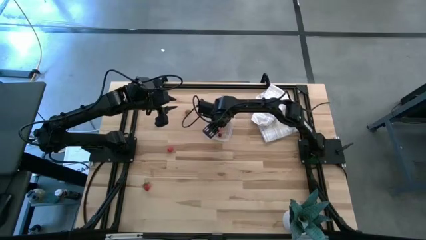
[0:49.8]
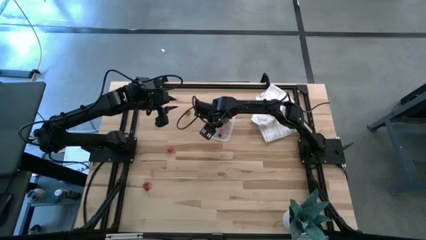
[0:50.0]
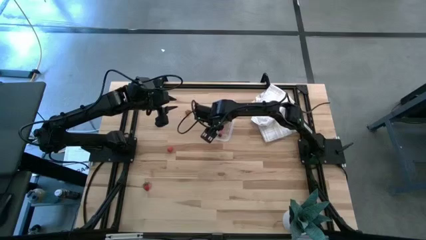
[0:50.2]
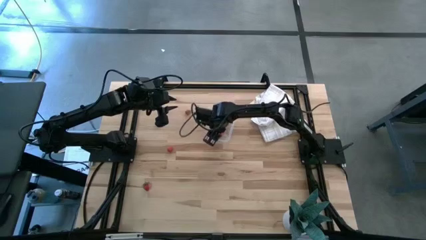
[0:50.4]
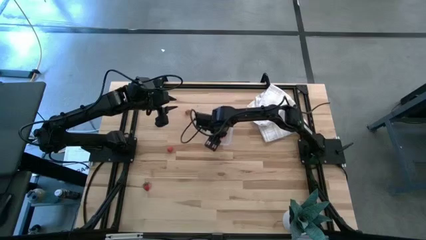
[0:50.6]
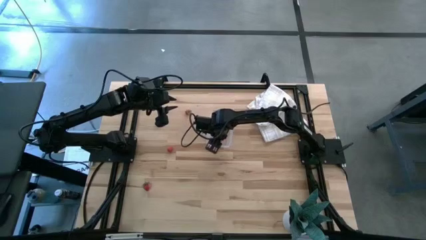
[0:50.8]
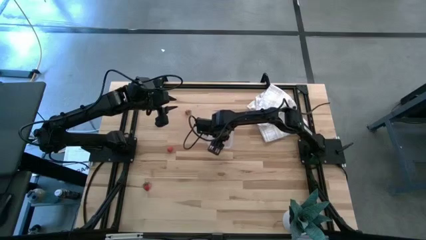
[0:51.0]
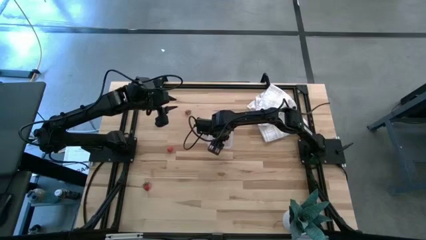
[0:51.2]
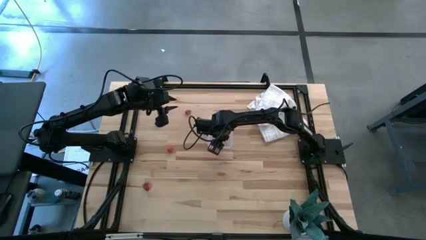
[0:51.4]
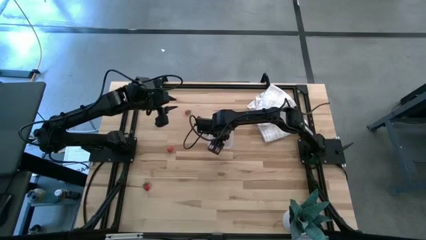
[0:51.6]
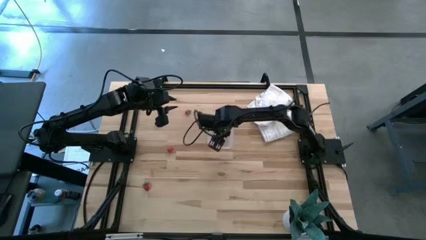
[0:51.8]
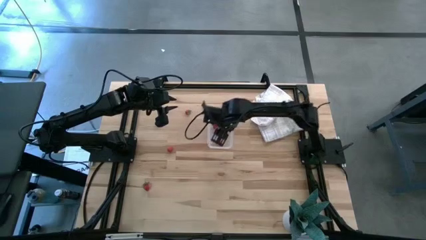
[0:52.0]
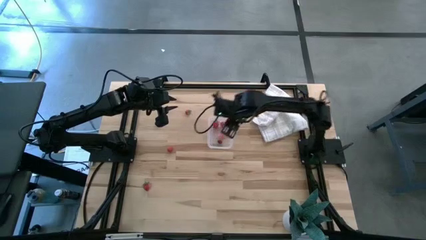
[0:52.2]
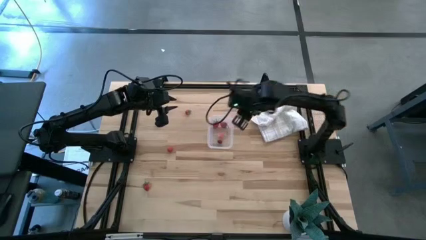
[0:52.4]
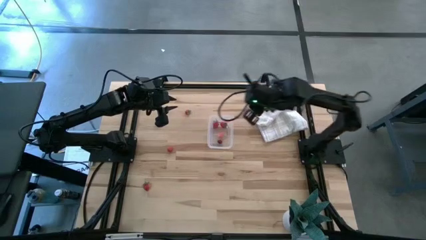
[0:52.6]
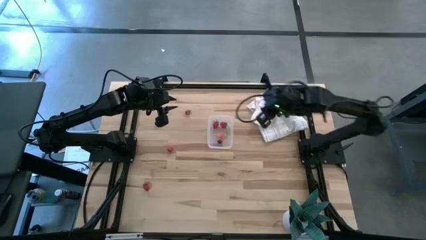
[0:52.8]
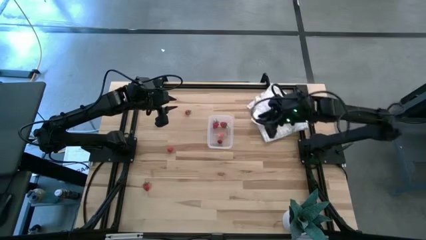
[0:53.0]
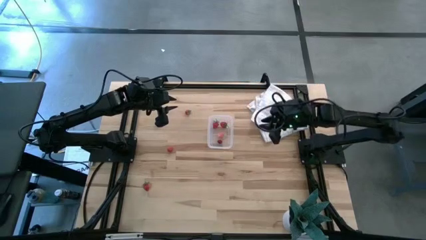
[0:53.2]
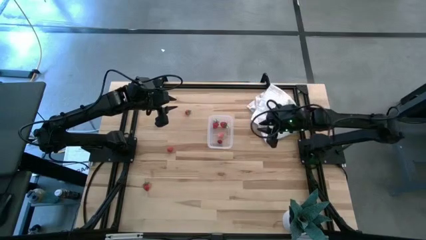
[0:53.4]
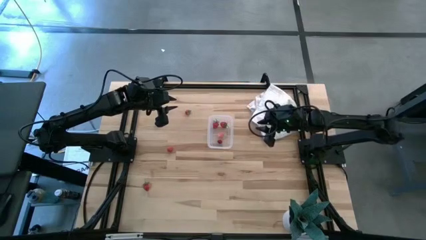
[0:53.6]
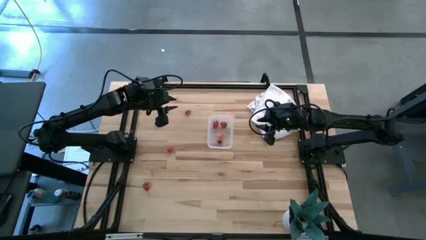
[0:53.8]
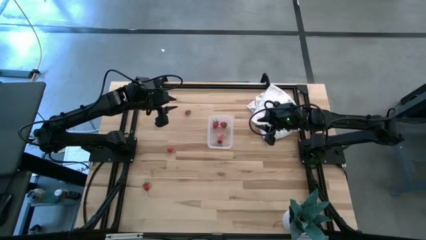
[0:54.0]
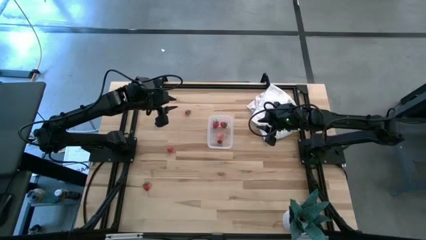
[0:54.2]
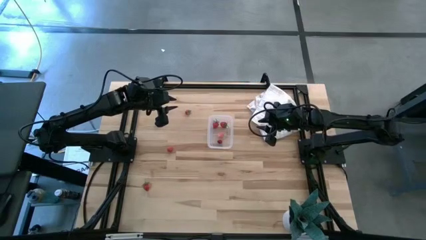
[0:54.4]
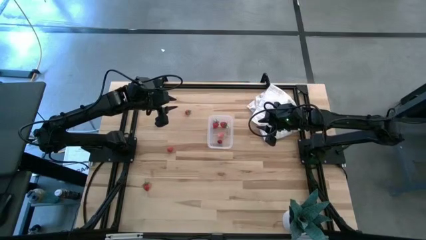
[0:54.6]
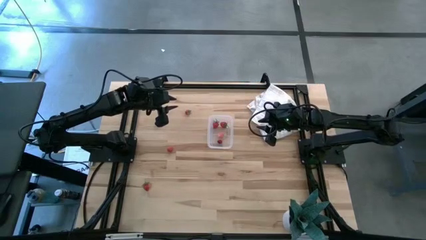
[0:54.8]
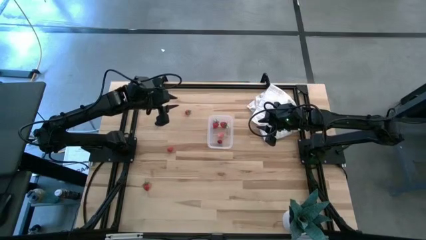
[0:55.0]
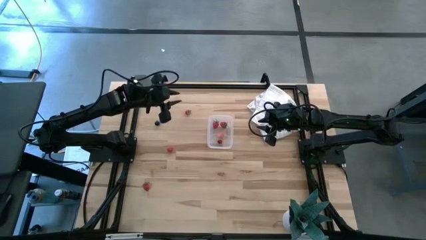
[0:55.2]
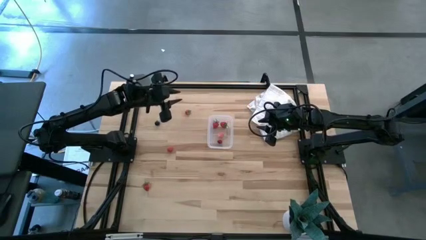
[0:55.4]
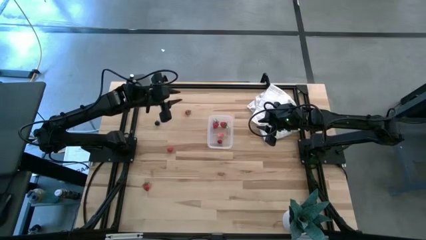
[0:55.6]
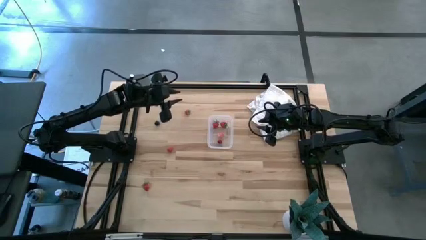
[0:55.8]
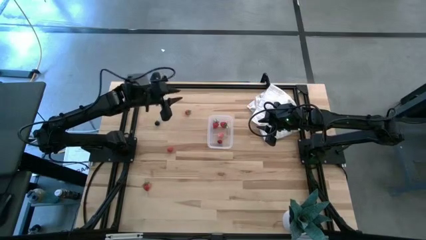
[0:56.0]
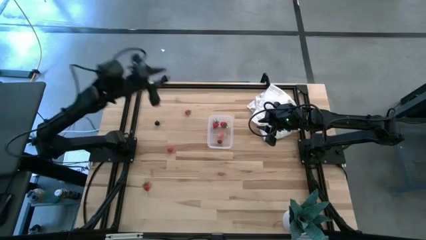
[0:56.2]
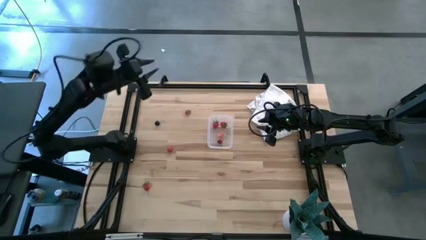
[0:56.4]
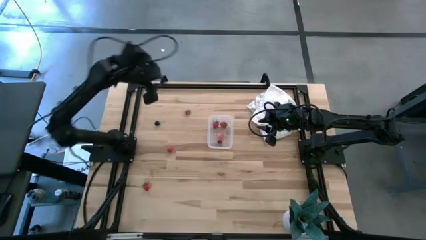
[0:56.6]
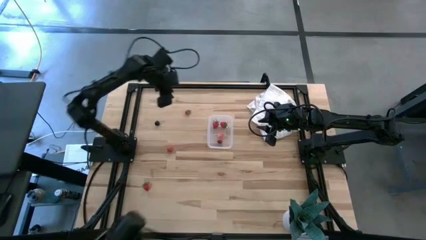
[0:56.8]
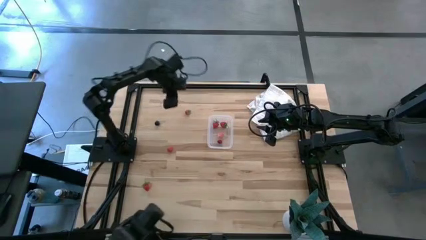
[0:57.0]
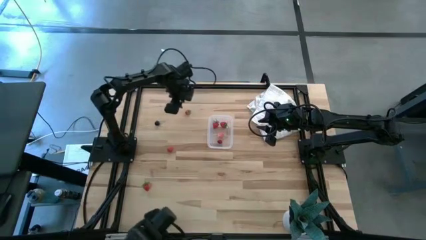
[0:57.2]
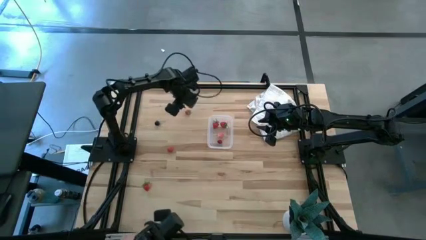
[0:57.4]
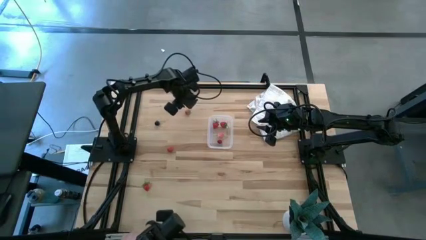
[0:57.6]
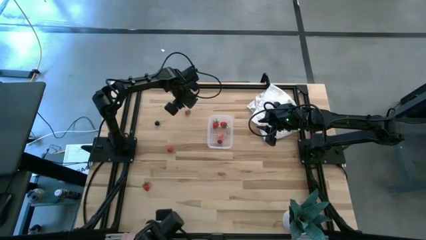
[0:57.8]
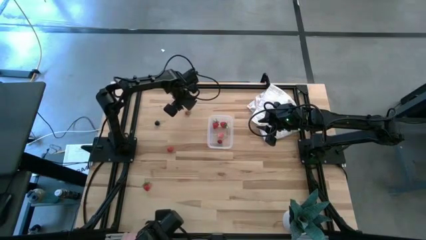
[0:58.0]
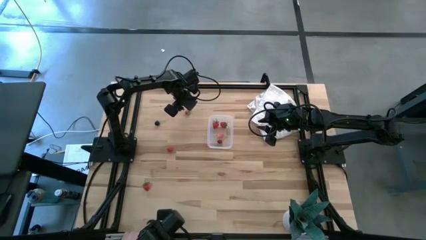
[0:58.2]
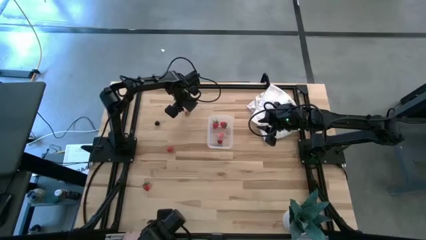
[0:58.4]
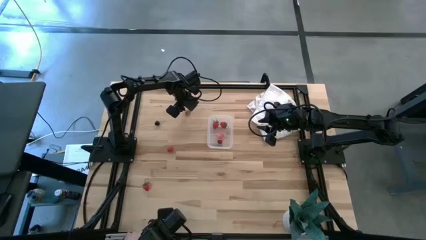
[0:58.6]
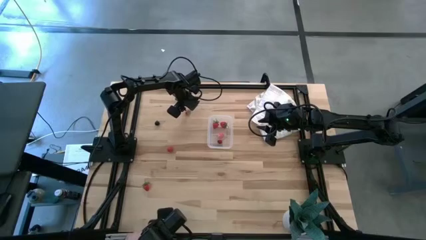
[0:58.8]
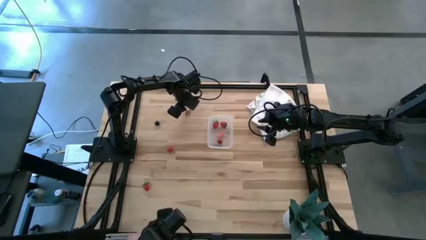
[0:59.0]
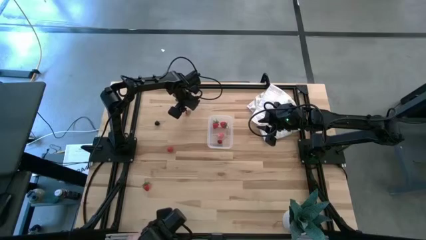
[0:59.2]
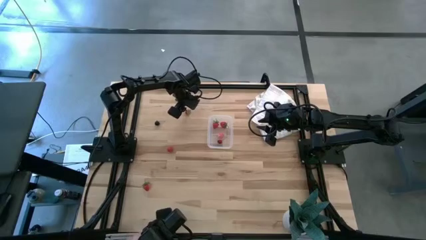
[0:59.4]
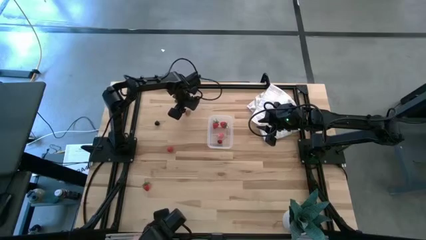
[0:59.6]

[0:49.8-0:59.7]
Task: Pick and placing Produce into tupperware
Put the strawberry into the transparent container
